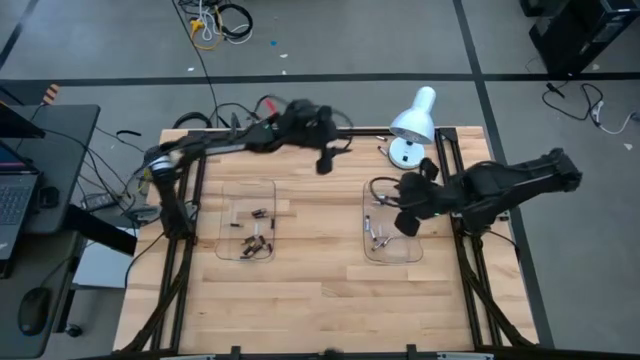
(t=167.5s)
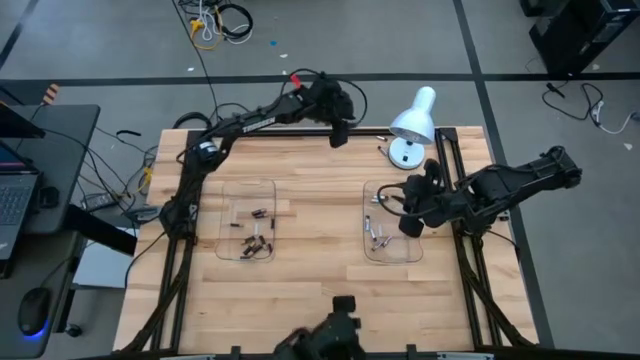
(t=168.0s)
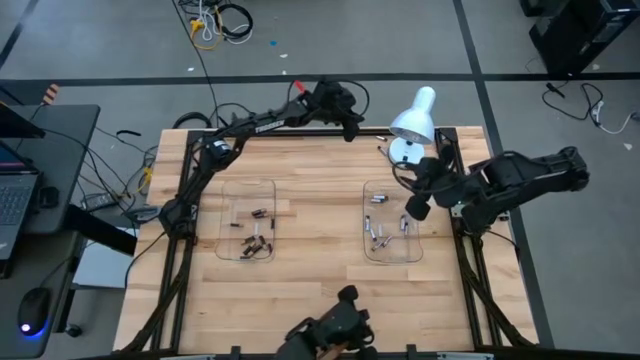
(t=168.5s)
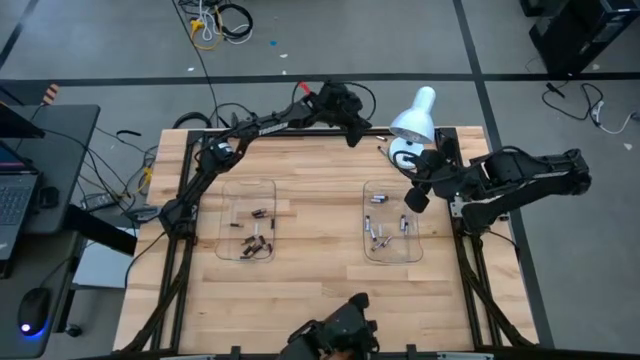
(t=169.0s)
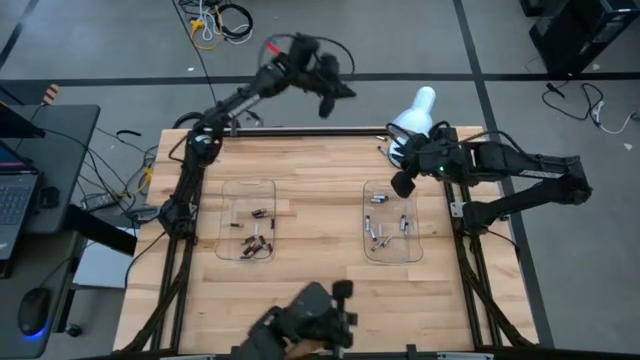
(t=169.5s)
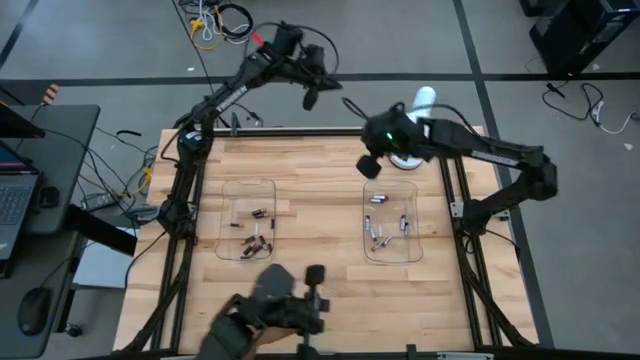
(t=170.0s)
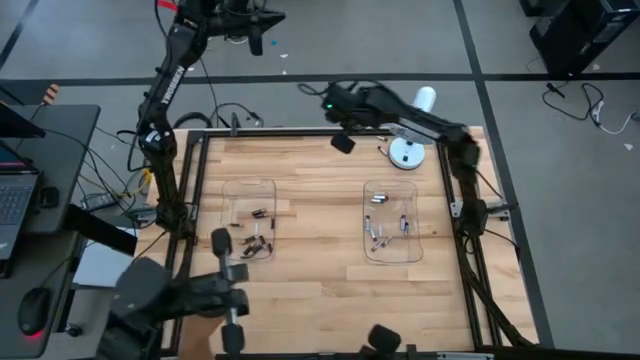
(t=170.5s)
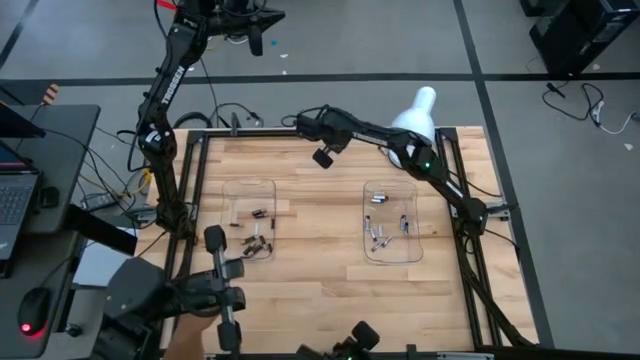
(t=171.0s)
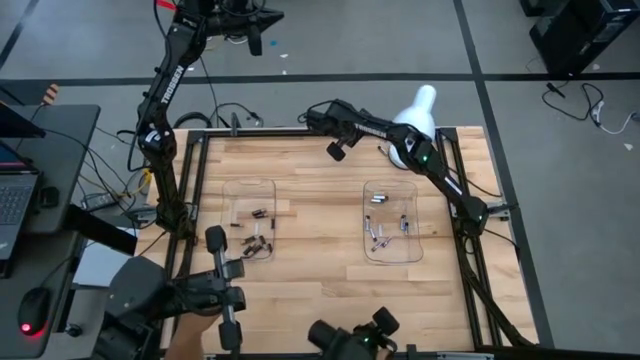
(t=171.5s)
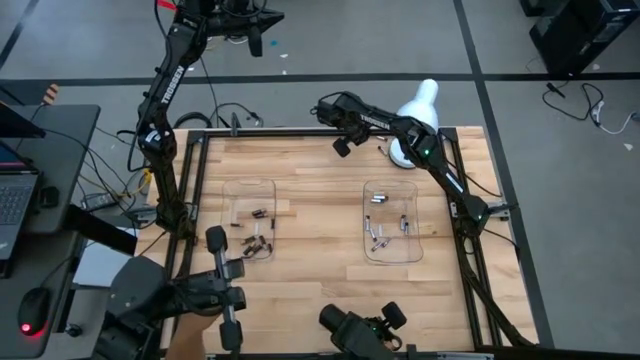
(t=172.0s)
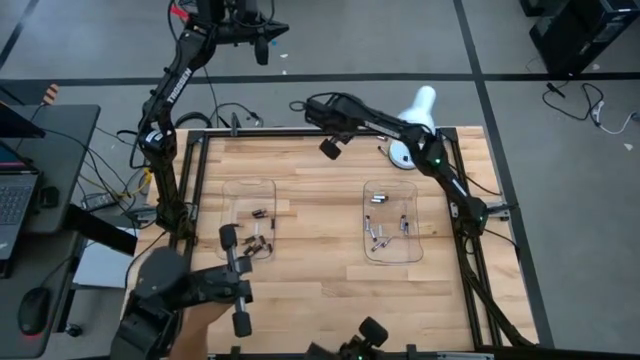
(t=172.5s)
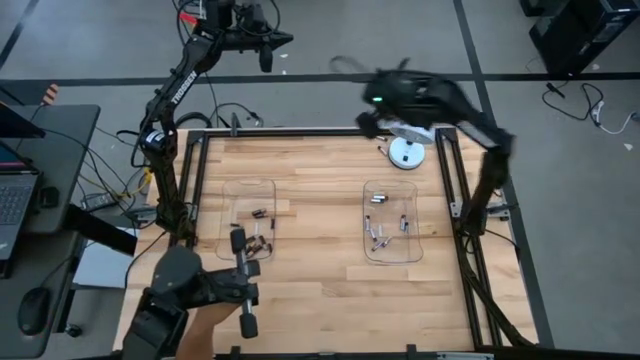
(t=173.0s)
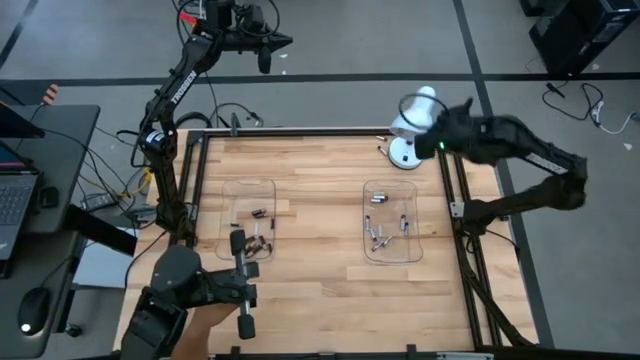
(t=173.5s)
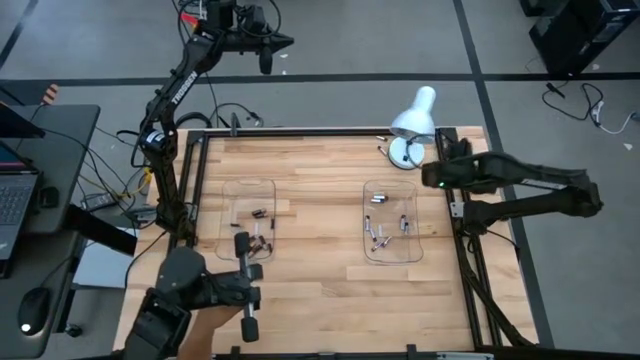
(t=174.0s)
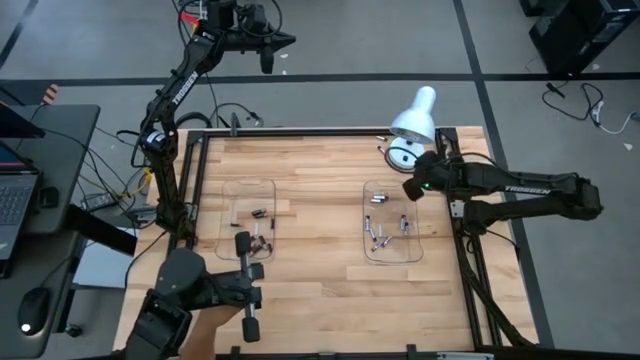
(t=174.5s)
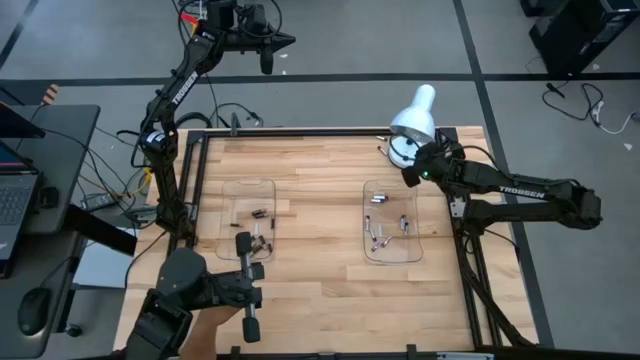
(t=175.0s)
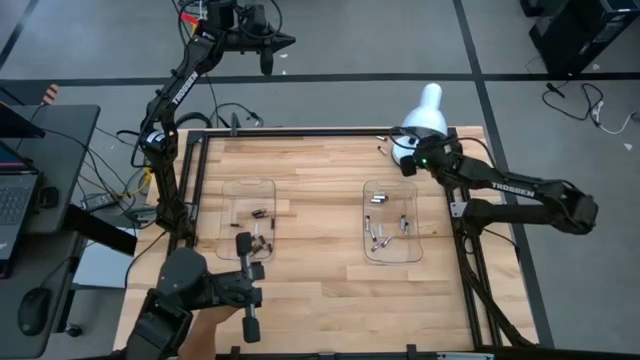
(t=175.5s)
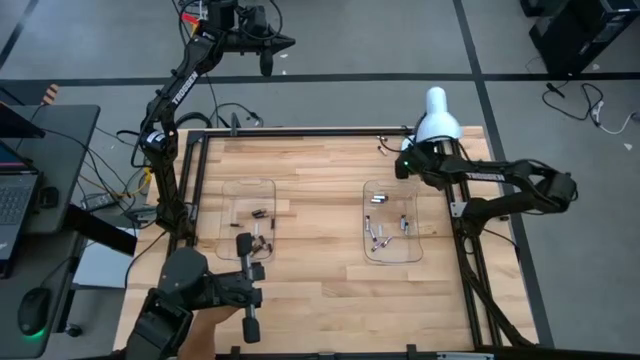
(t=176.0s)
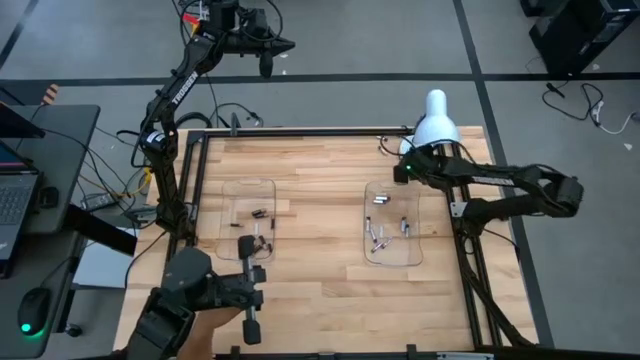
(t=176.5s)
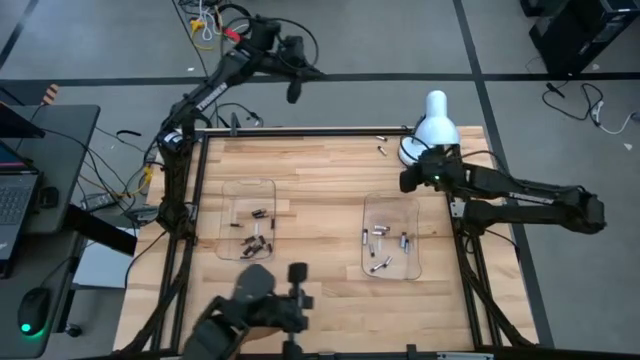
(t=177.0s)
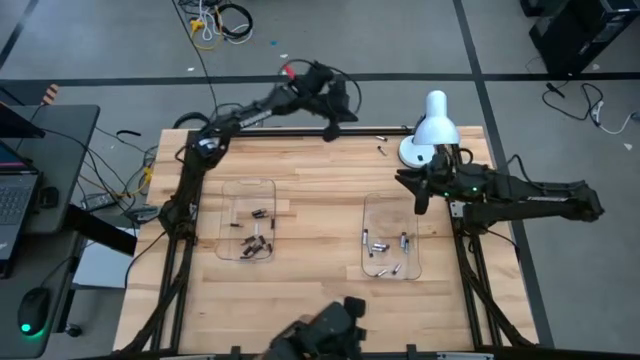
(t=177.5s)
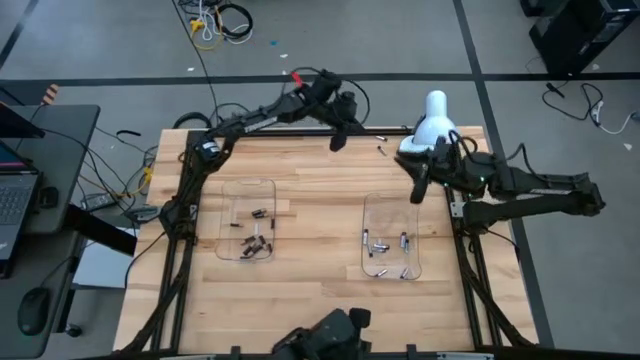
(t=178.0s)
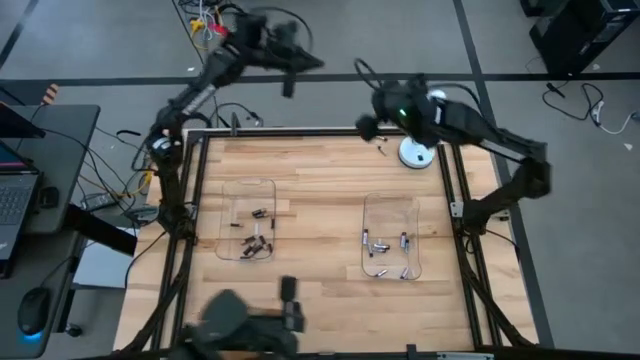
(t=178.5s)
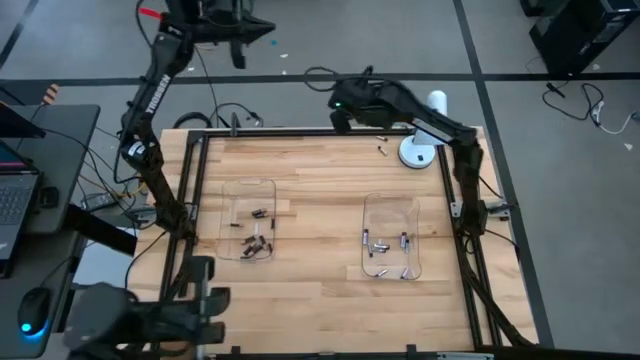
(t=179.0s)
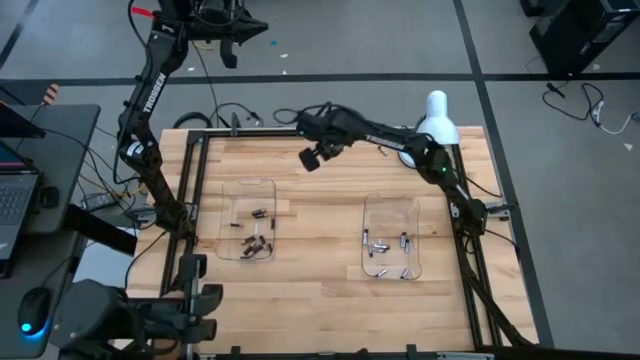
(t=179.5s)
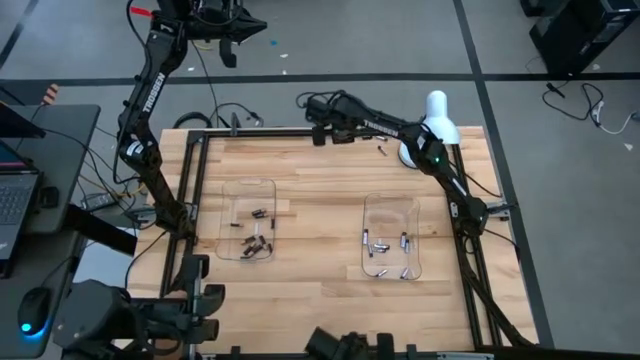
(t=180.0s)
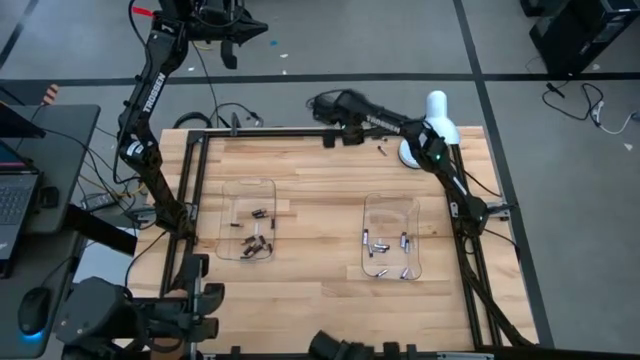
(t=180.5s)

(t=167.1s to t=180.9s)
Task: Sort batteries
Put the silver battery into the right transparent bin

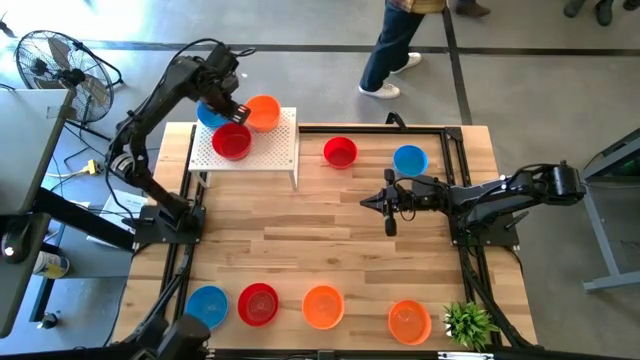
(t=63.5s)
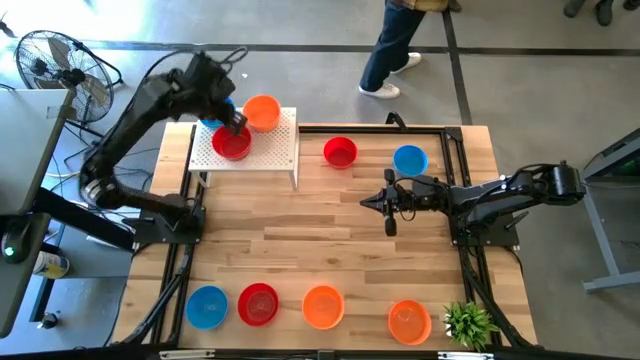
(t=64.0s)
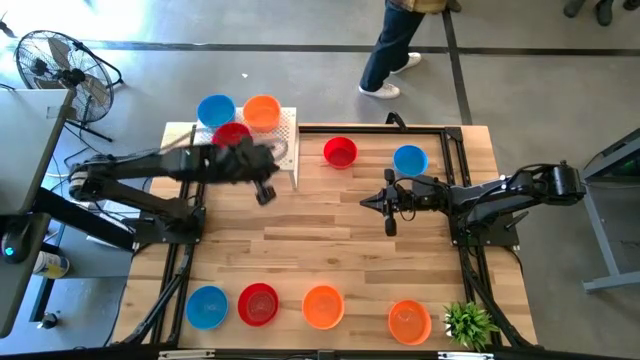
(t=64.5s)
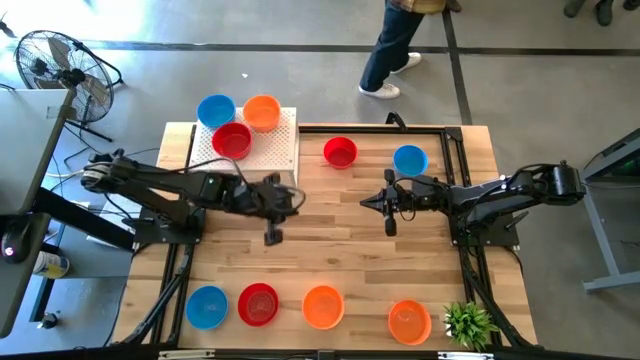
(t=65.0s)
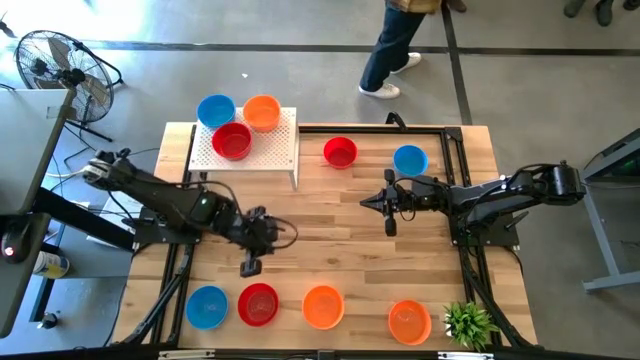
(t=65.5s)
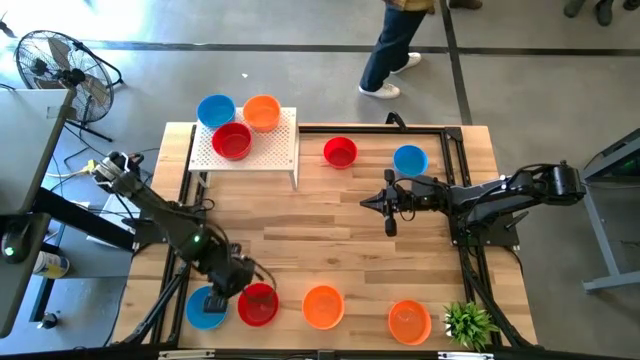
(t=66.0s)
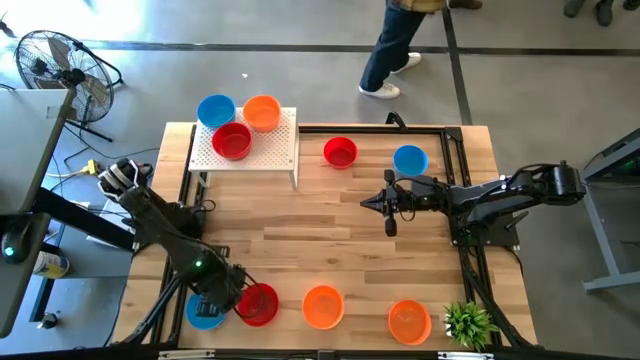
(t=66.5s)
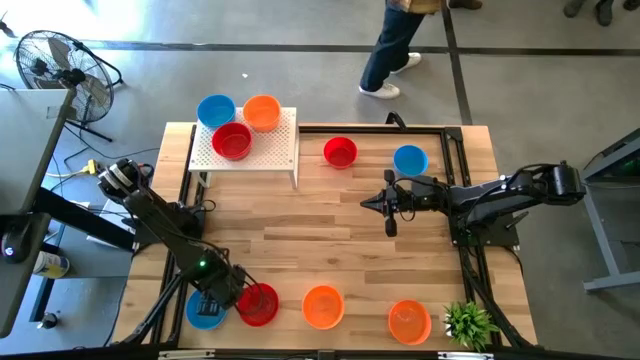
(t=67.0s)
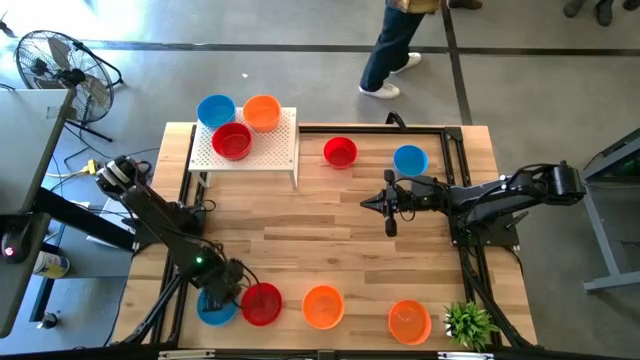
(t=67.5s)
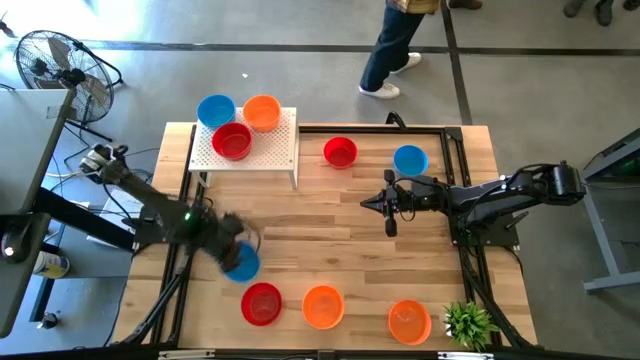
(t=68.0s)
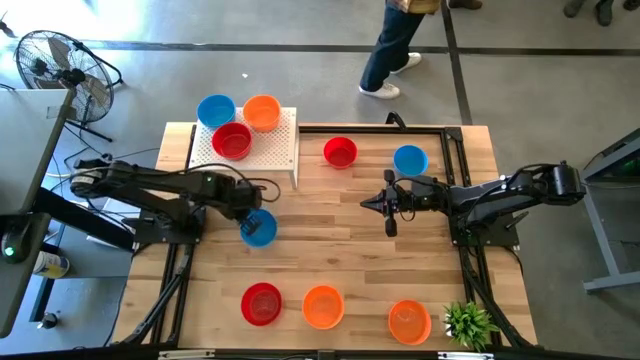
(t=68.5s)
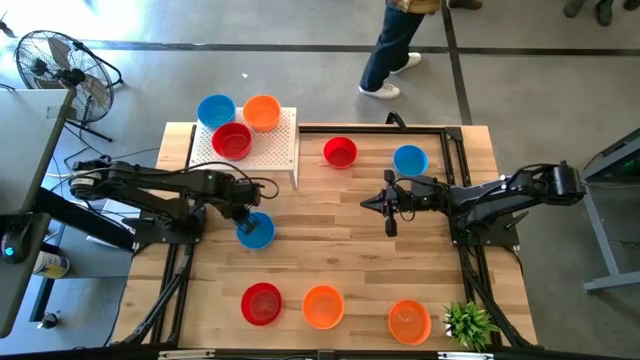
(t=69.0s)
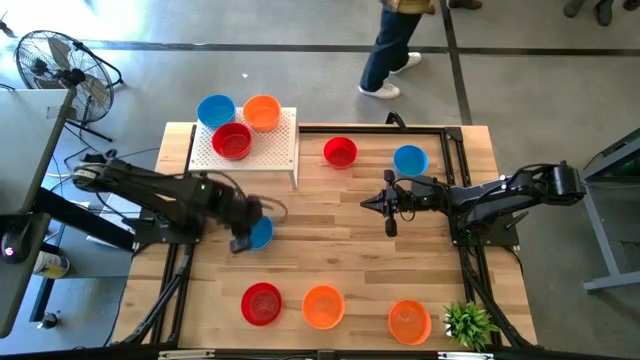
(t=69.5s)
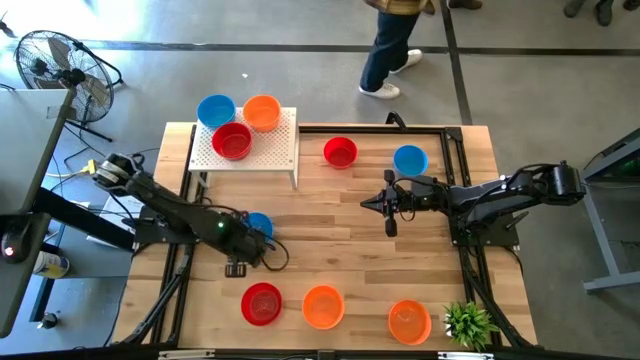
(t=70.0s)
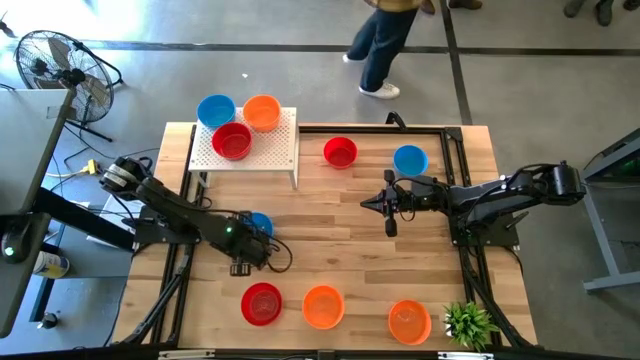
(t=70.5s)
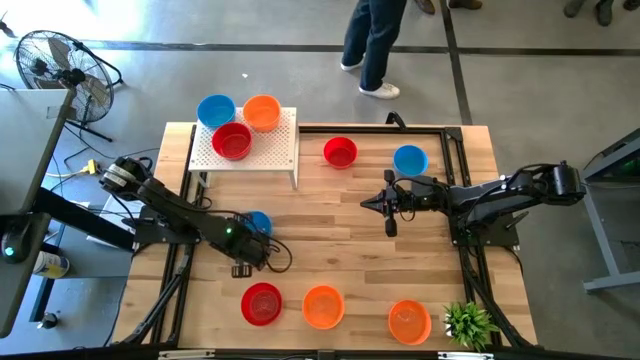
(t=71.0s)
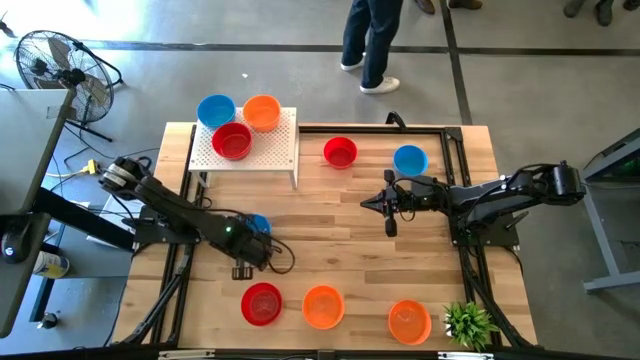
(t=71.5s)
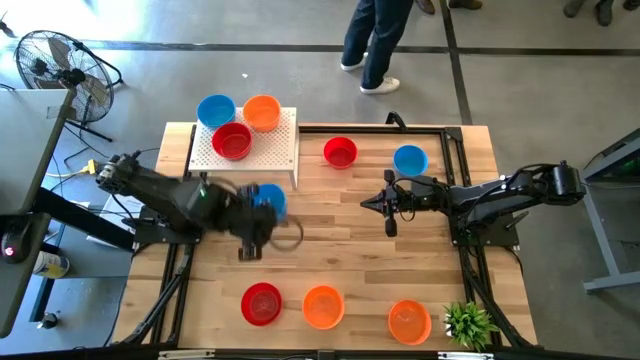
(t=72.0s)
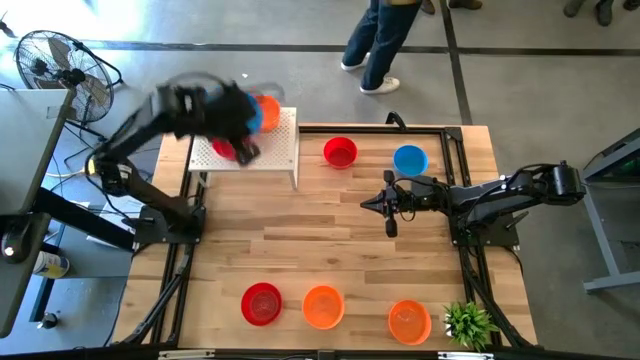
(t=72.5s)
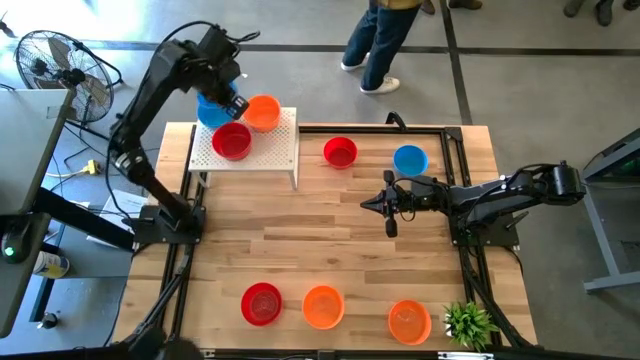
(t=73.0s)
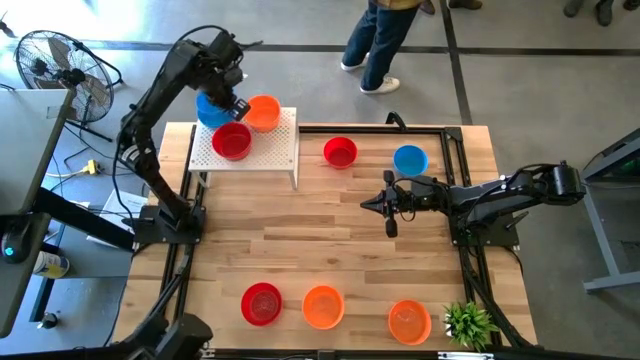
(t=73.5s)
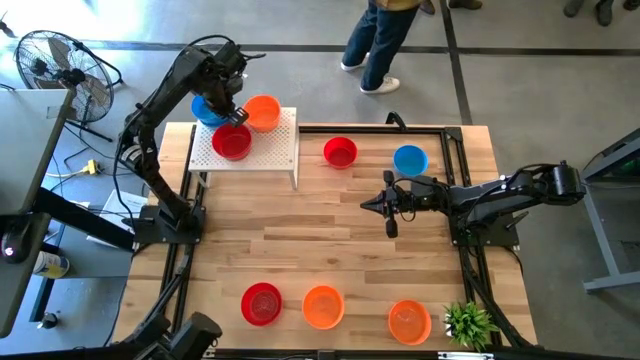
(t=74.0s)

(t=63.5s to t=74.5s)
Task: Pick & Place Mini bowls
Stack the blue bowl on top of the blue bowl on the shelf
